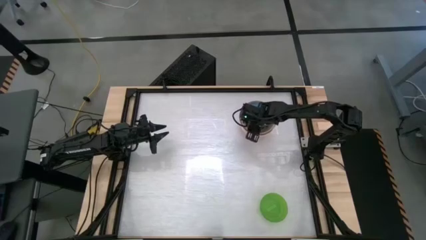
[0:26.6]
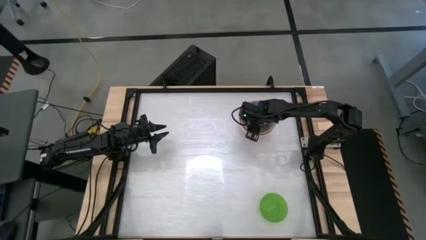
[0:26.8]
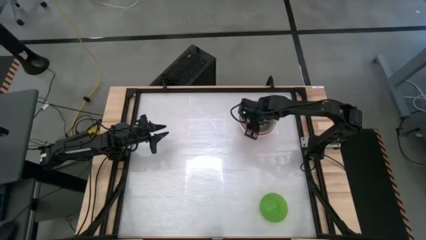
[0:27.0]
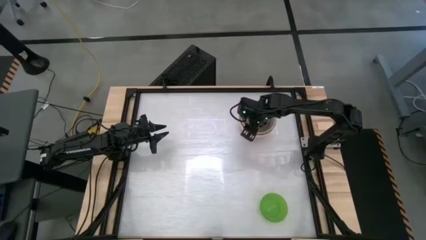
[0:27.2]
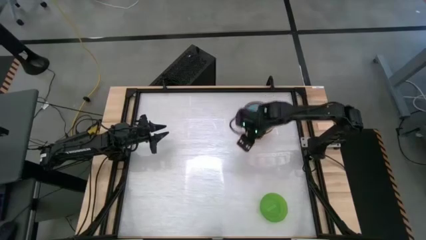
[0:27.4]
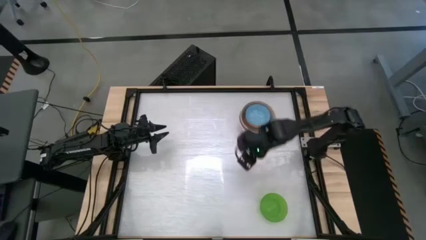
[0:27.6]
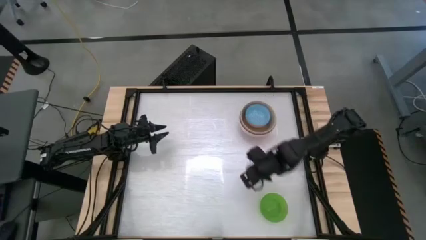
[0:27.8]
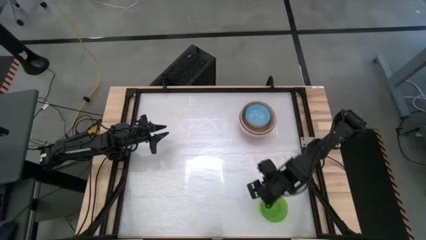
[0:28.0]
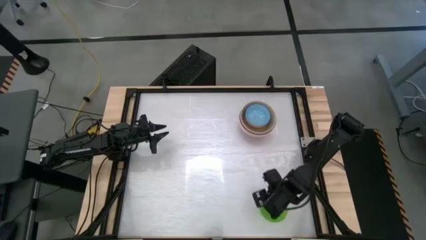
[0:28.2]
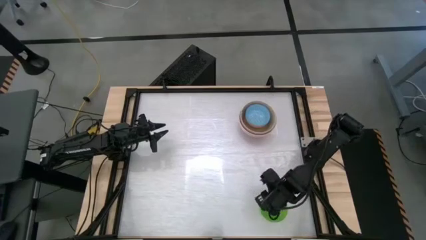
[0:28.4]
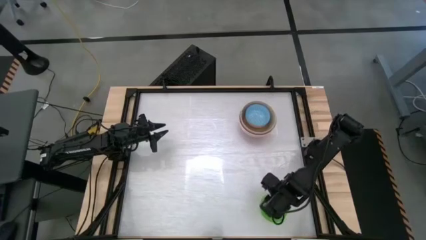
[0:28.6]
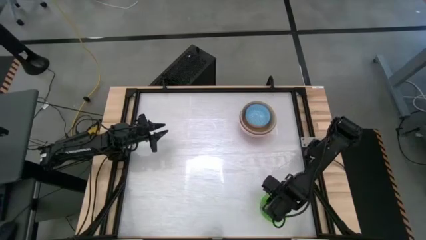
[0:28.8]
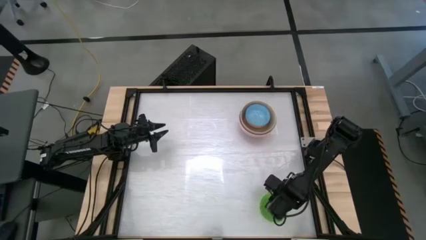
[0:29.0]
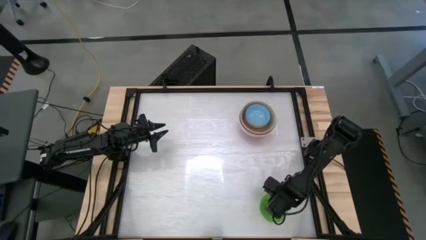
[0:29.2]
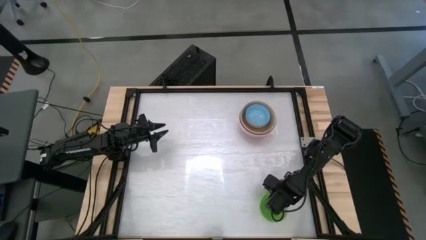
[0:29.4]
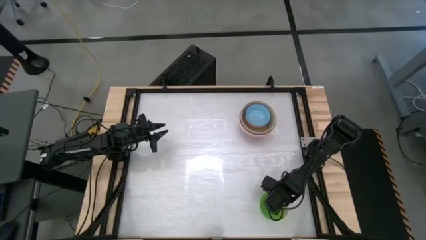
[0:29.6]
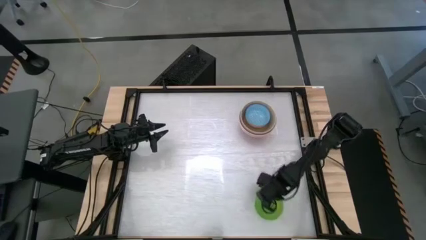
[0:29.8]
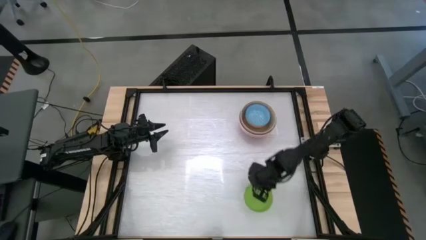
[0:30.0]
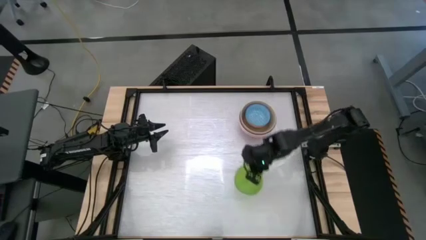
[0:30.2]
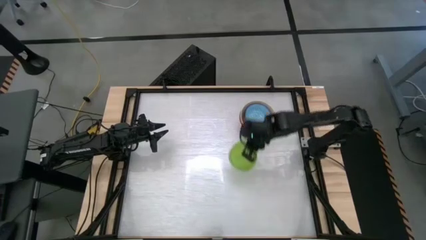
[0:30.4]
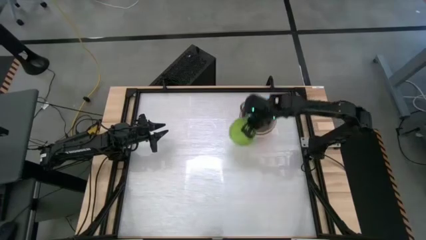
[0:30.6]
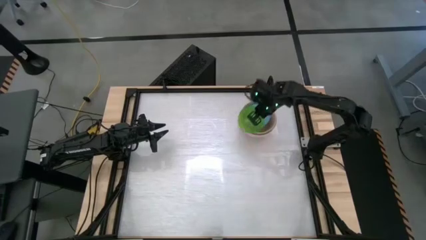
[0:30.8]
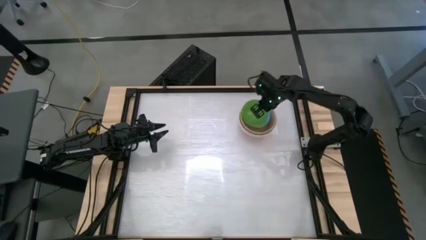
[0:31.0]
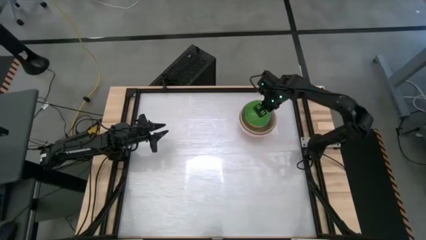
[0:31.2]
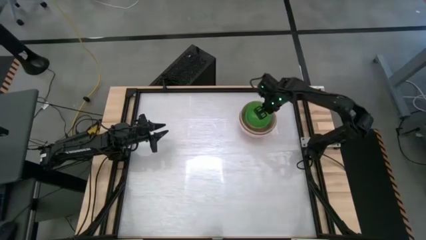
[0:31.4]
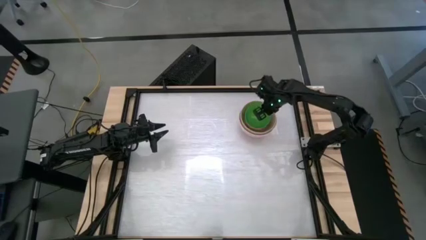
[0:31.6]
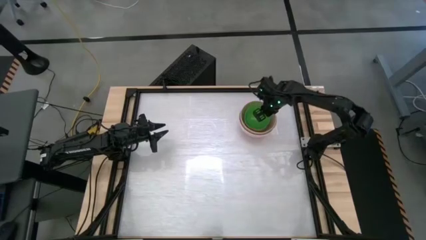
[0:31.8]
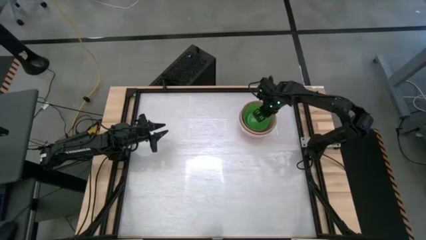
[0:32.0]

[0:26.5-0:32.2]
Stack the green bowl on top of the blue bowl

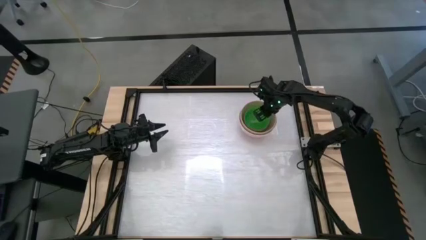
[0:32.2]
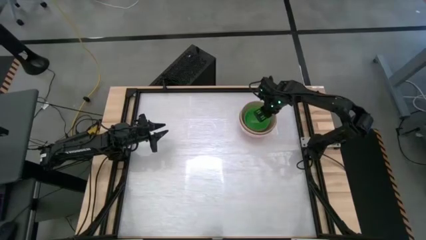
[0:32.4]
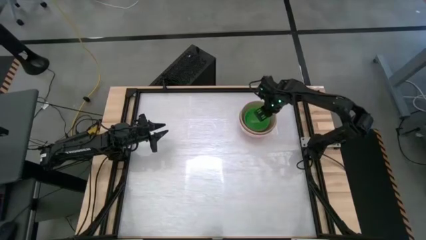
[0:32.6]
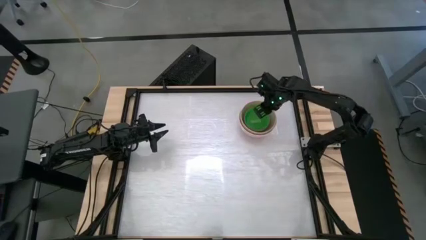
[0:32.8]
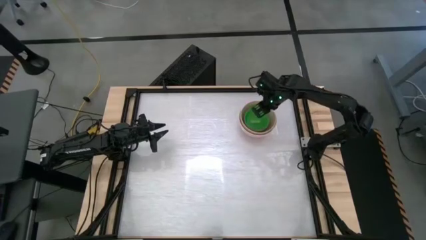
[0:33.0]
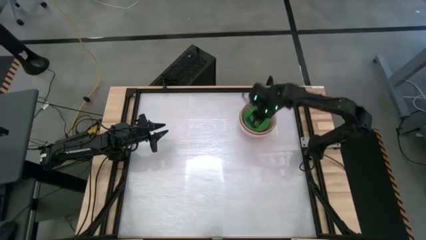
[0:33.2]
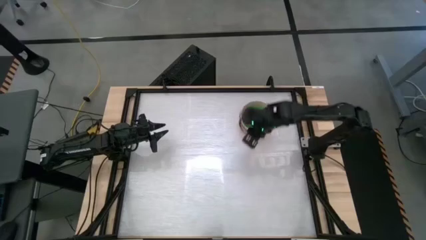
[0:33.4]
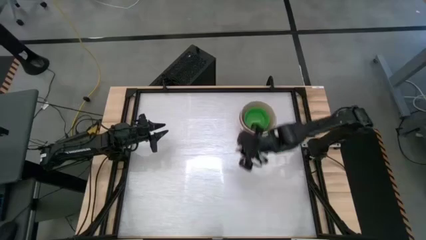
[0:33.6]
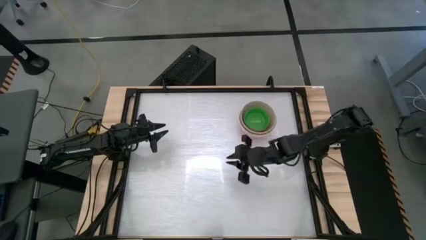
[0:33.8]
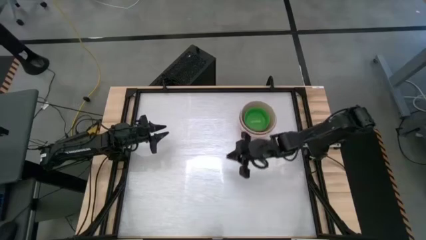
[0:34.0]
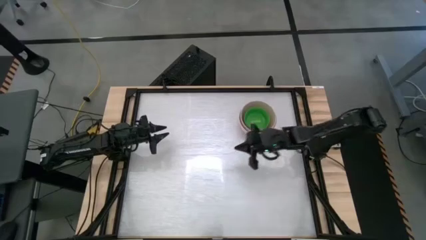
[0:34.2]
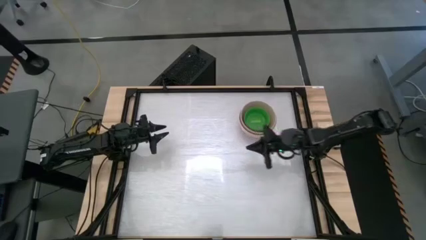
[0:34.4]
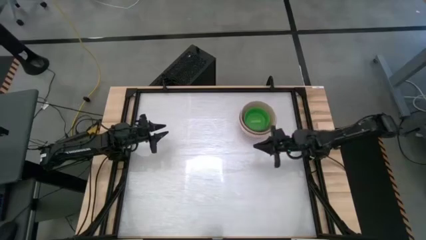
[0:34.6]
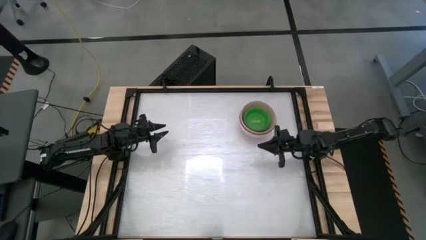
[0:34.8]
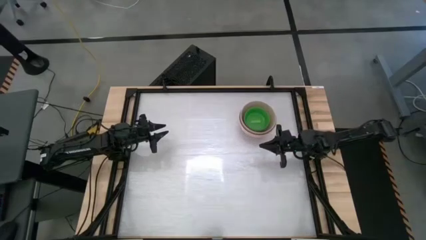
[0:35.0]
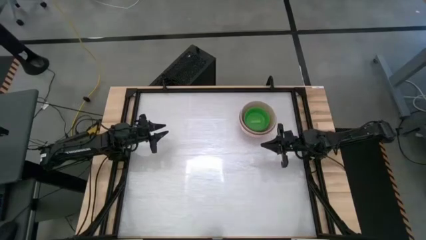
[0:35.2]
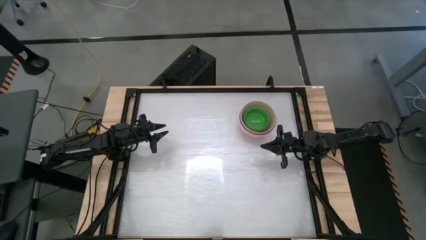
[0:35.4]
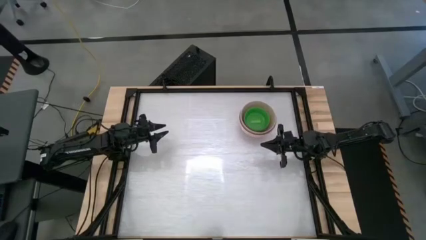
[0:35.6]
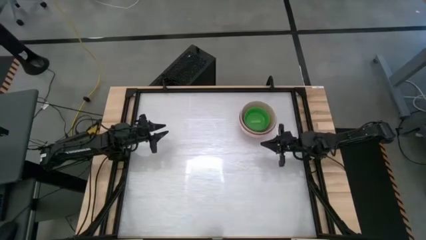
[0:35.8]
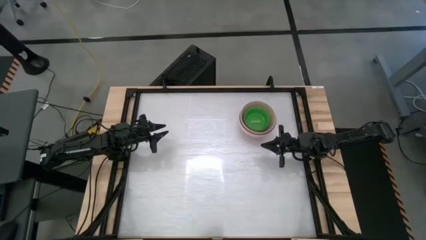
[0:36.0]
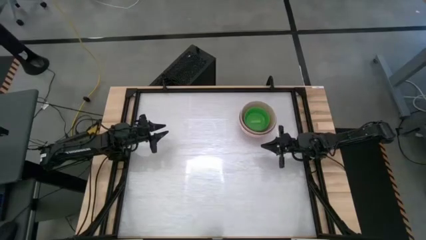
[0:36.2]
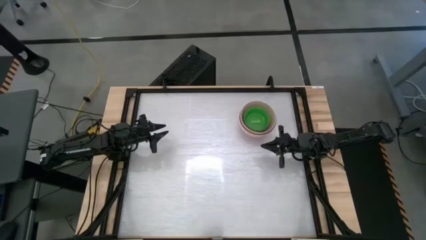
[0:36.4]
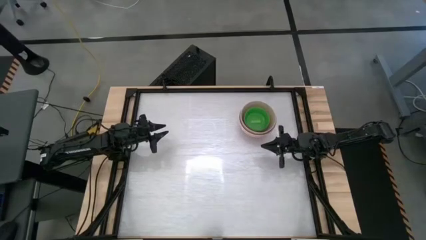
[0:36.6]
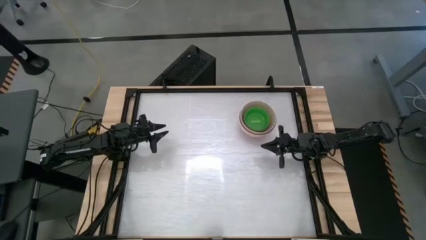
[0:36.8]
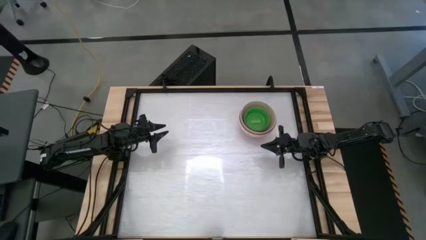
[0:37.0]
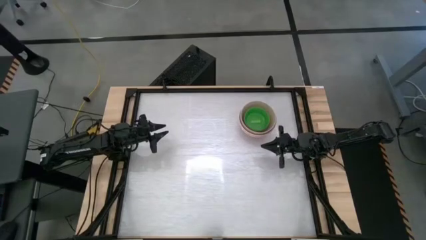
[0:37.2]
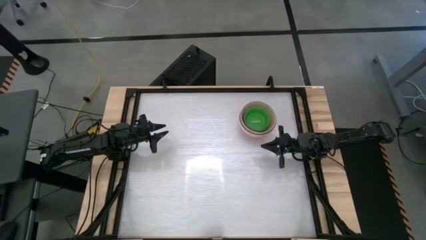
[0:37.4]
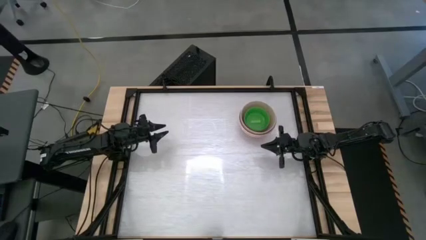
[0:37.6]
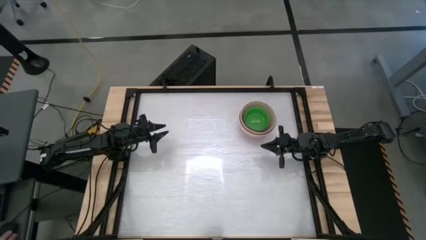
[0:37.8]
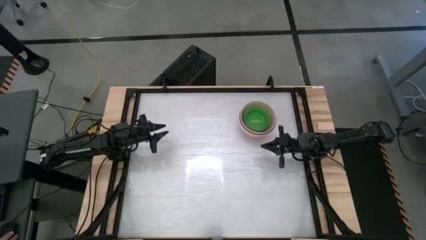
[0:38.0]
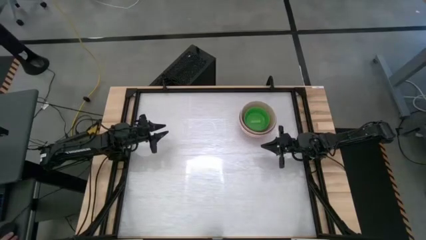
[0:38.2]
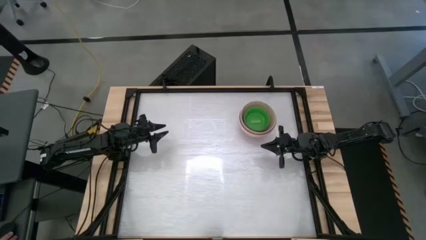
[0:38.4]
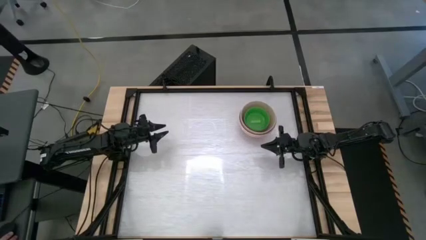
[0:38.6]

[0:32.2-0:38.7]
Return to Home Position

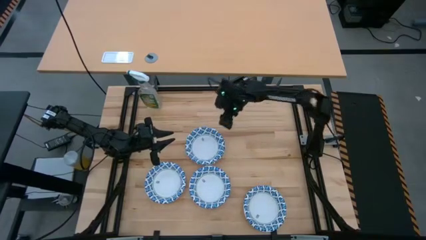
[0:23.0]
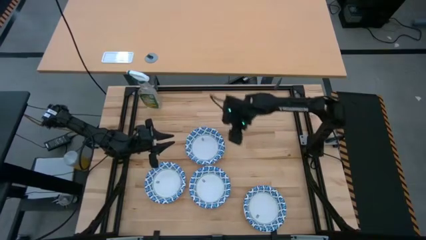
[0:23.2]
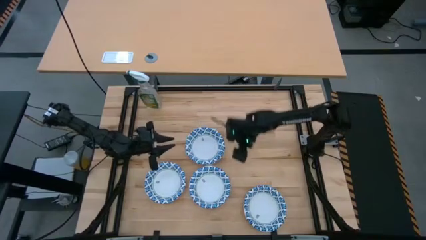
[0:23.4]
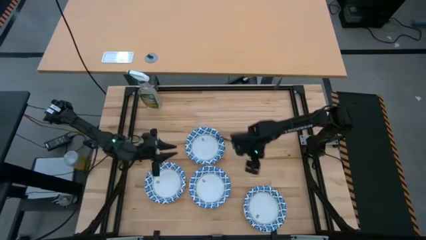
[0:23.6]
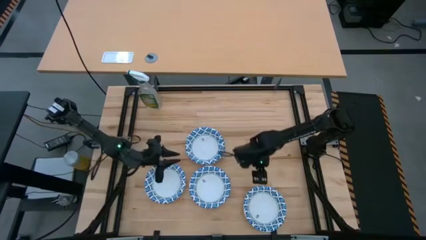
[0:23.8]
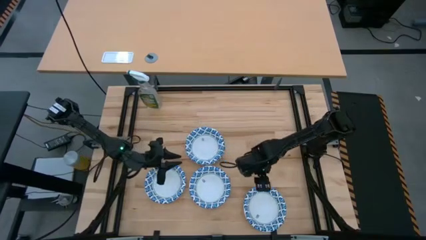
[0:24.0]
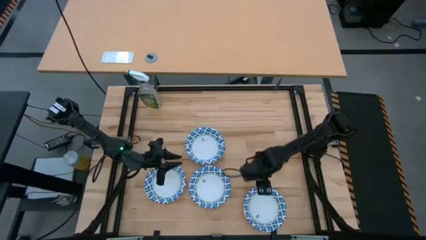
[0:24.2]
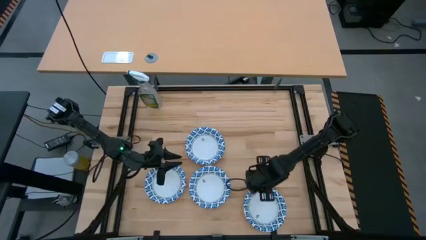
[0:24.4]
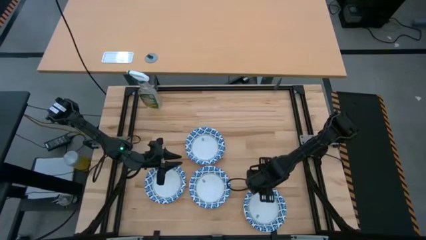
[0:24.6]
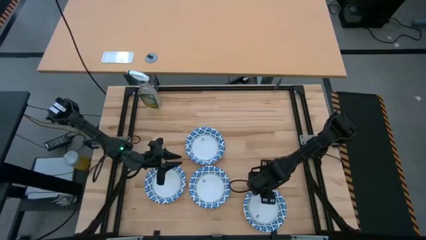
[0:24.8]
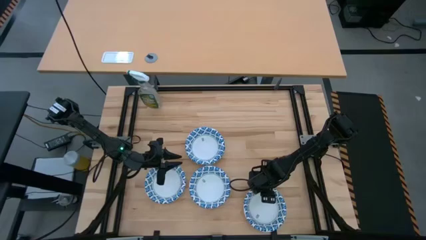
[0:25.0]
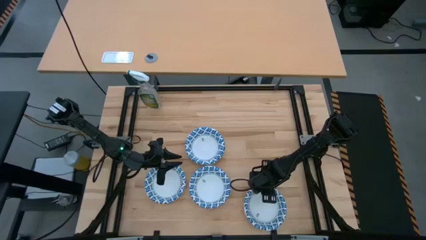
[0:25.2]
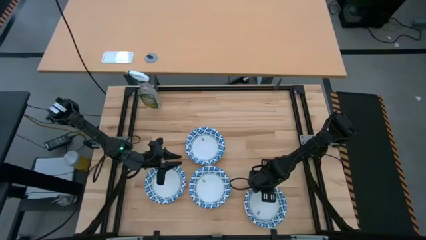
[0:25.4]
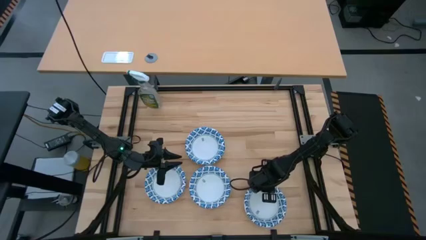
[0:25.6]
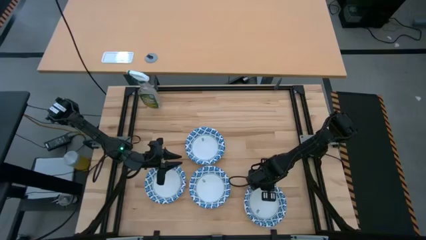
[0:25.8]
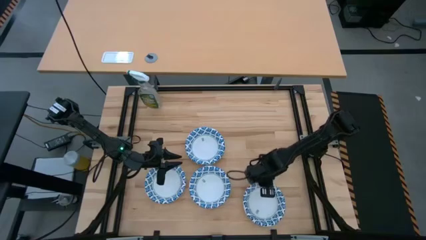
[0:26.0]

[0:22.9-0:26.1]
Put the white bowl on top of the white bowl

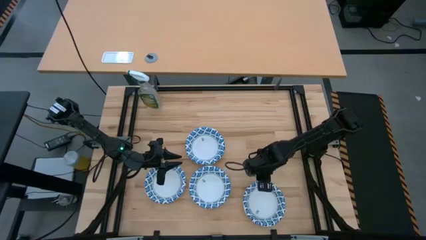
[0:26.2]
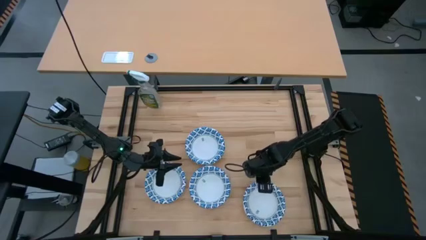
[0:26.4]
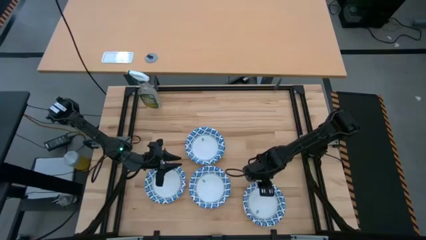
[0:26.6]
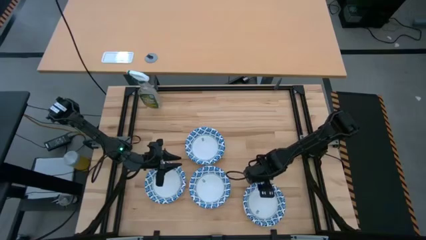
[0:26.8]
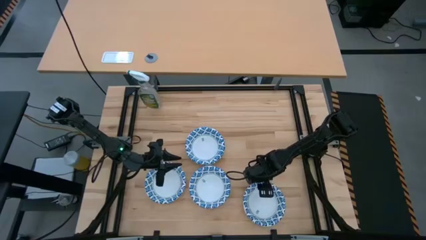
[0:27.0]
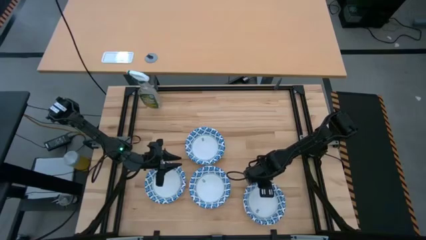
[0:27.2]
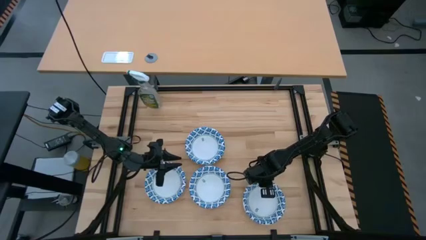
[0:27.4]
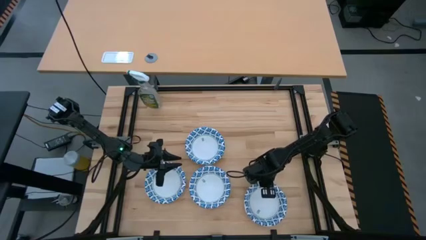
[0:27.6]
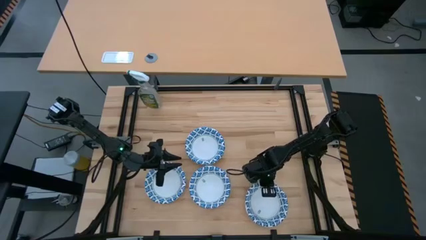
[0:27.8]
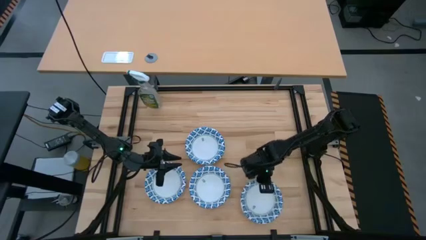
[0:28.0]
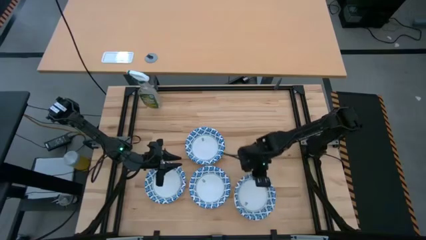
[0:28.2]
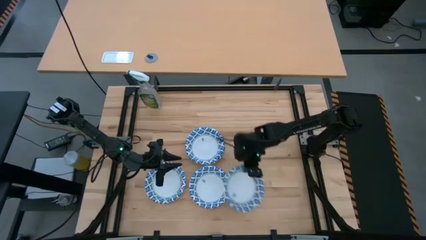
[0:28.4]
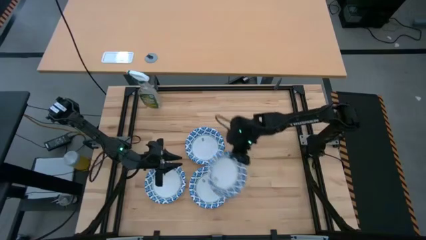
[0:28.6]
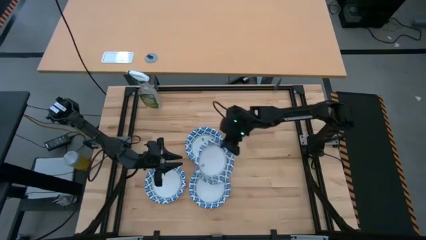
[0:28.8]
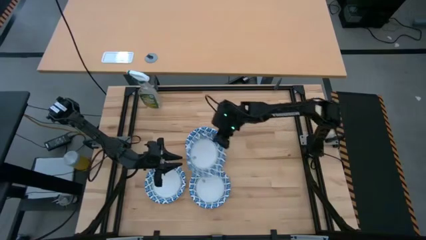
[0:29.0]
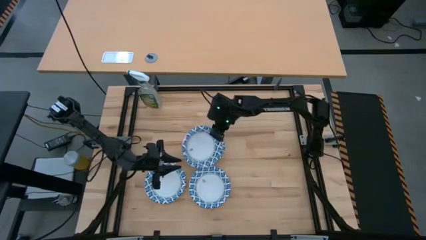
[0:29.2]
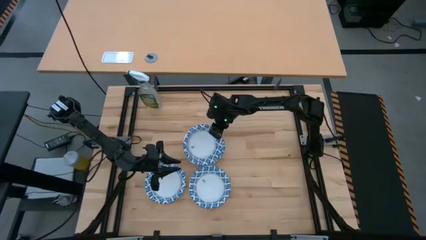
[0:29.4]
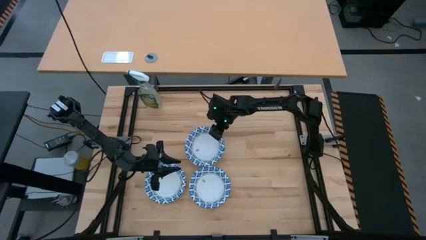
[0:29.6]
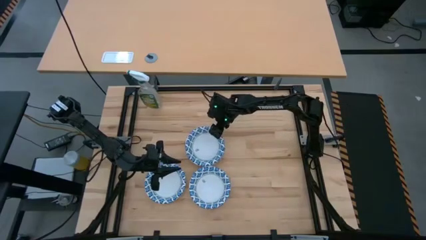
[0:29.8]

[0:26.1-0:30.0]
Put the white bowl on top of the white bowl
